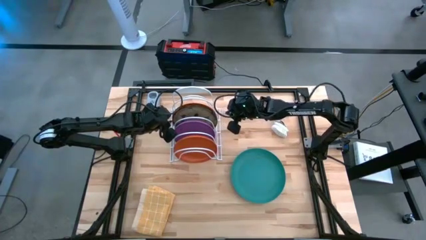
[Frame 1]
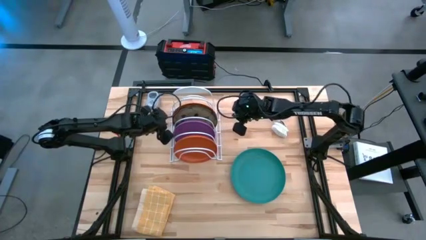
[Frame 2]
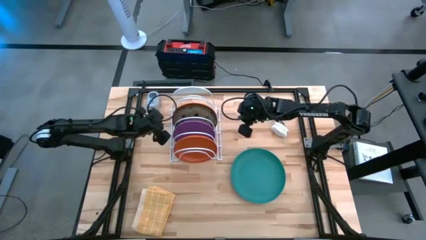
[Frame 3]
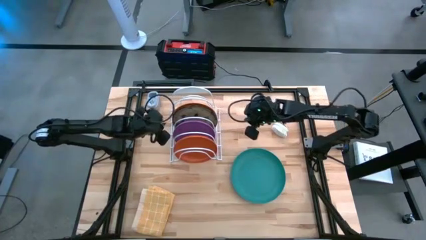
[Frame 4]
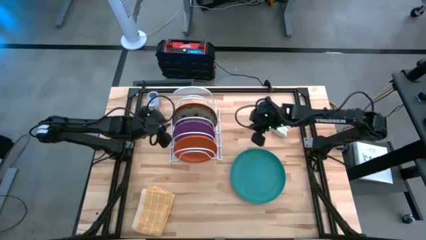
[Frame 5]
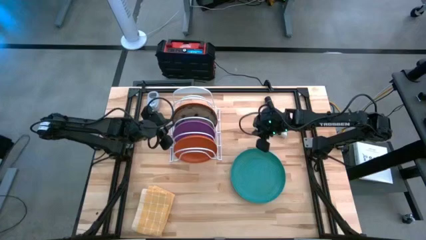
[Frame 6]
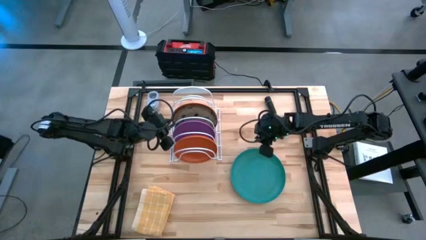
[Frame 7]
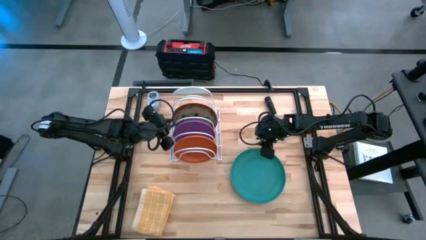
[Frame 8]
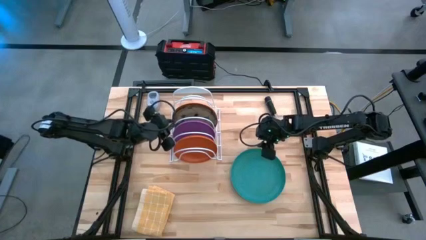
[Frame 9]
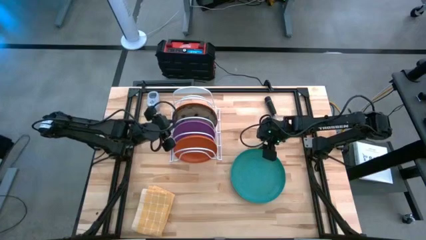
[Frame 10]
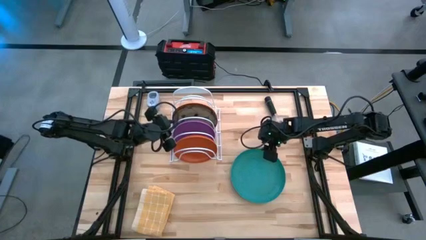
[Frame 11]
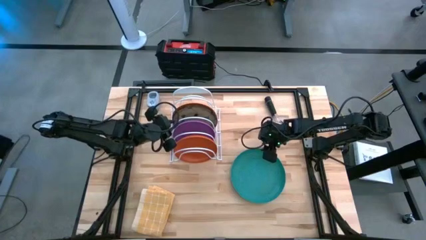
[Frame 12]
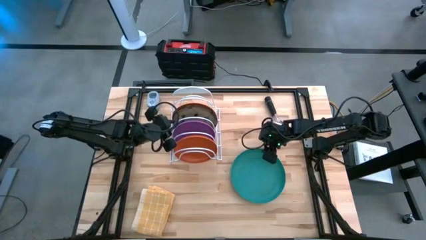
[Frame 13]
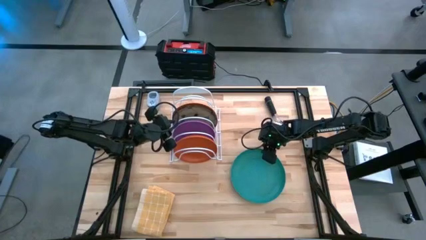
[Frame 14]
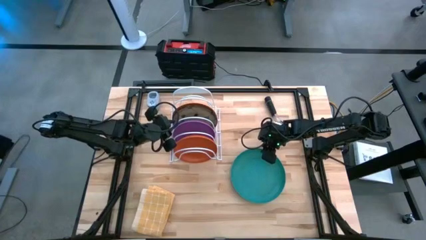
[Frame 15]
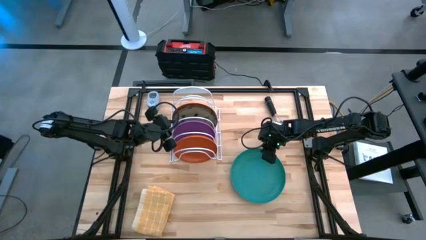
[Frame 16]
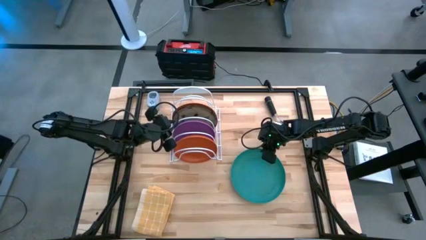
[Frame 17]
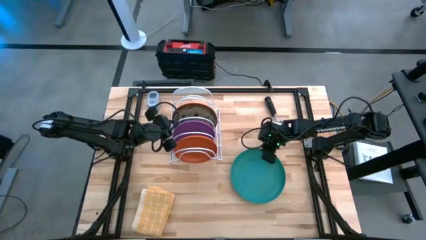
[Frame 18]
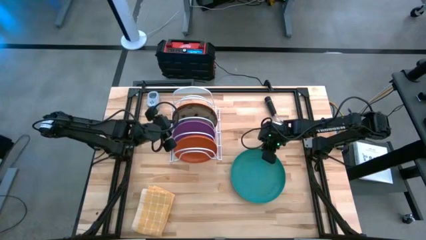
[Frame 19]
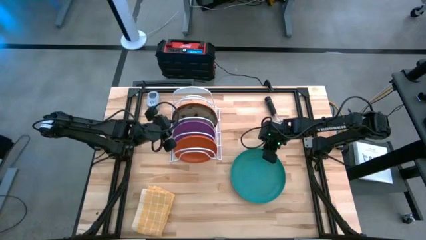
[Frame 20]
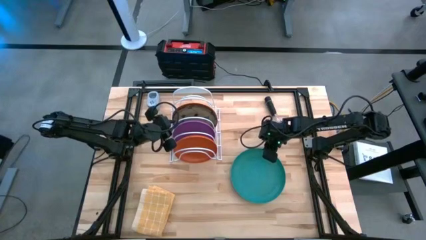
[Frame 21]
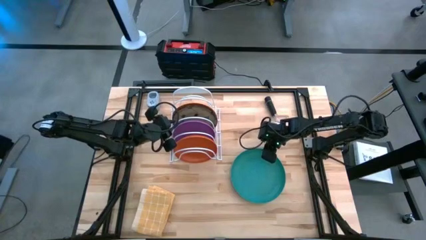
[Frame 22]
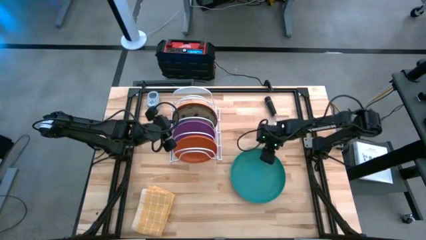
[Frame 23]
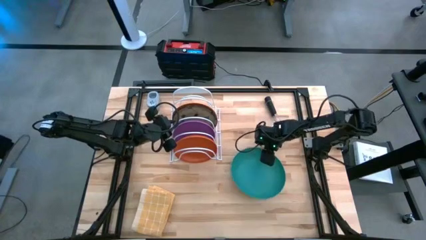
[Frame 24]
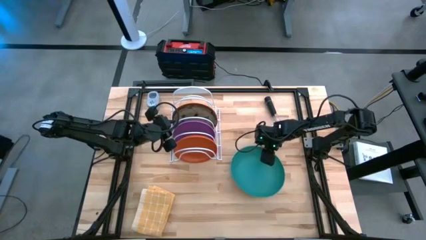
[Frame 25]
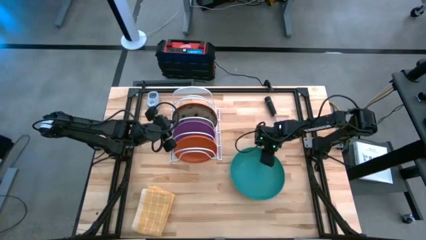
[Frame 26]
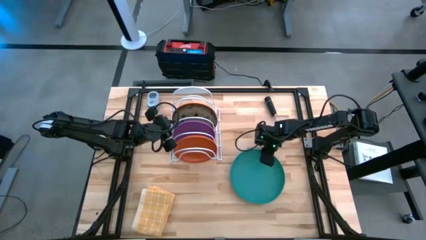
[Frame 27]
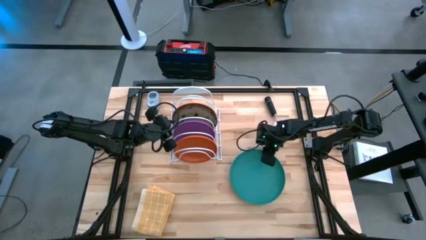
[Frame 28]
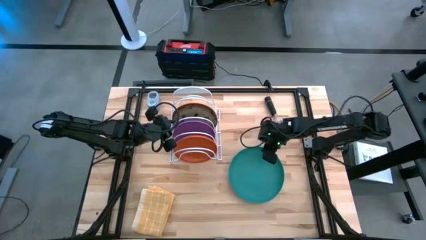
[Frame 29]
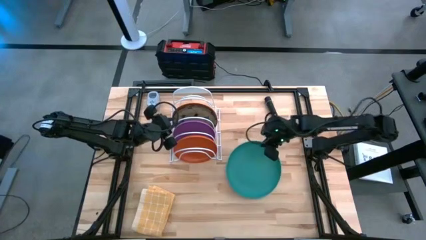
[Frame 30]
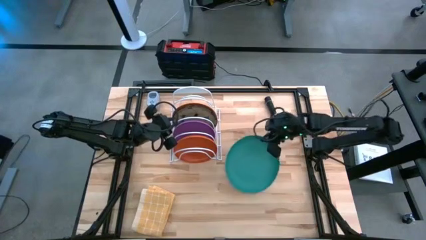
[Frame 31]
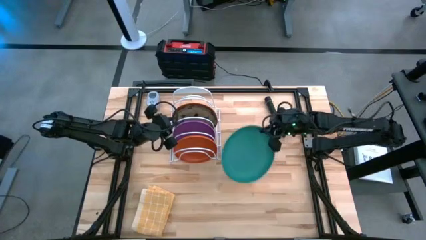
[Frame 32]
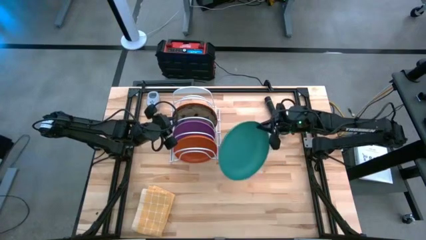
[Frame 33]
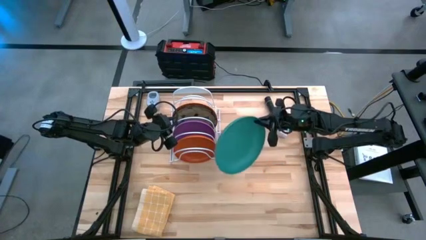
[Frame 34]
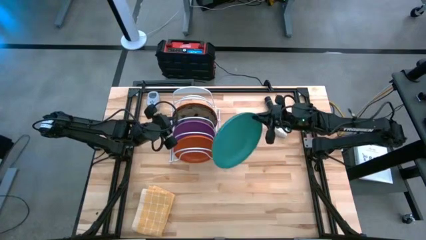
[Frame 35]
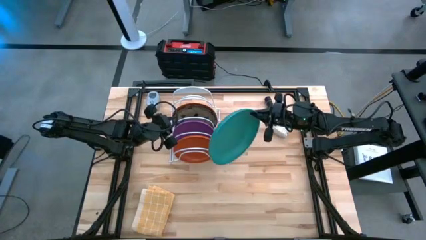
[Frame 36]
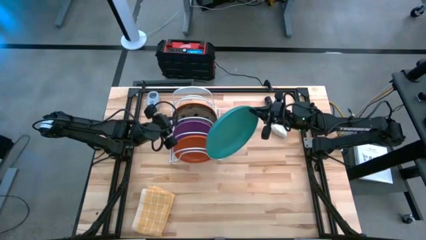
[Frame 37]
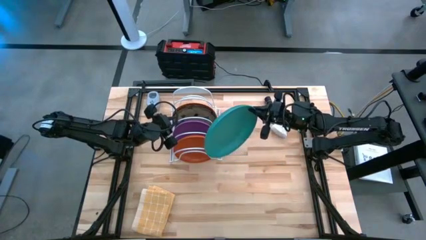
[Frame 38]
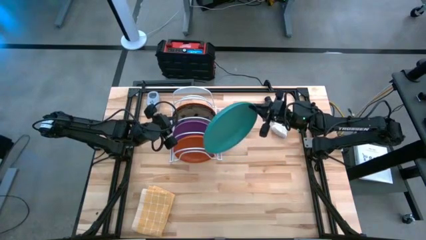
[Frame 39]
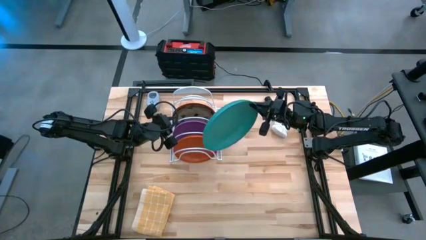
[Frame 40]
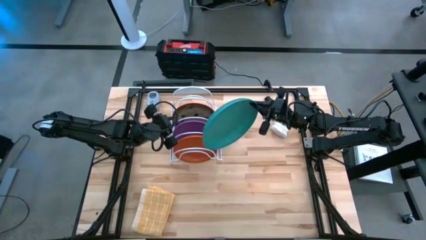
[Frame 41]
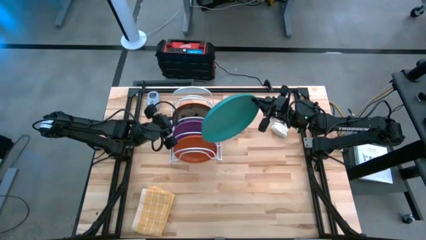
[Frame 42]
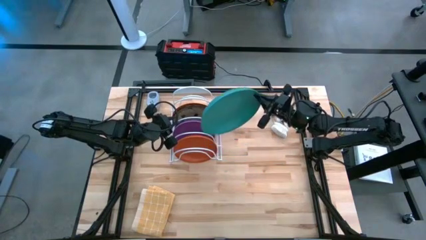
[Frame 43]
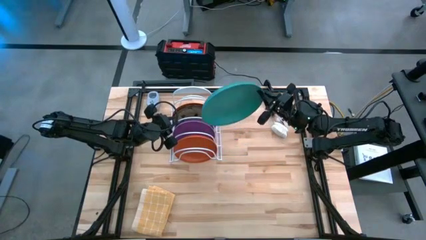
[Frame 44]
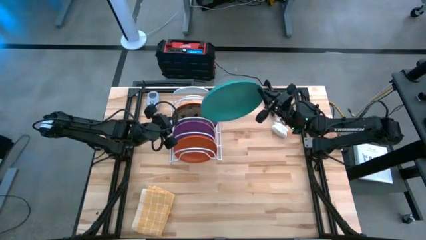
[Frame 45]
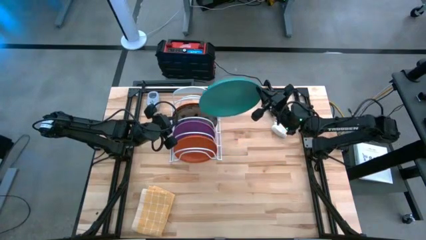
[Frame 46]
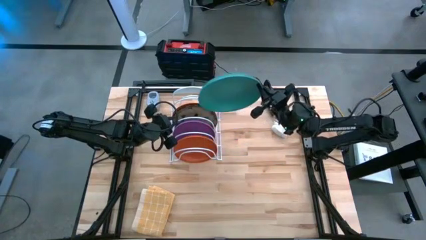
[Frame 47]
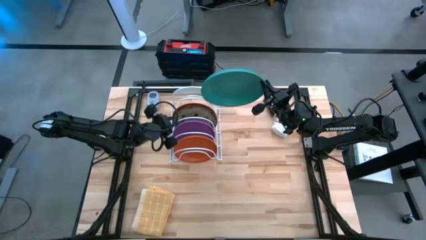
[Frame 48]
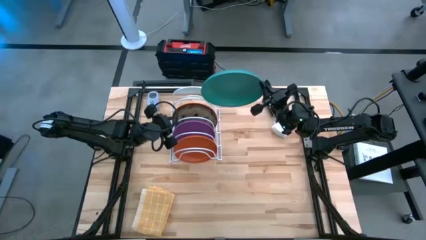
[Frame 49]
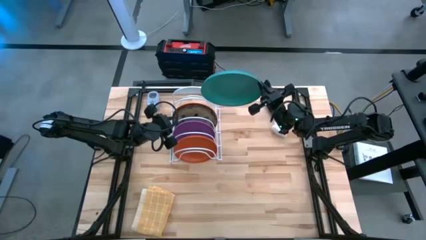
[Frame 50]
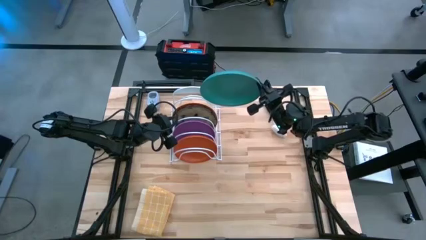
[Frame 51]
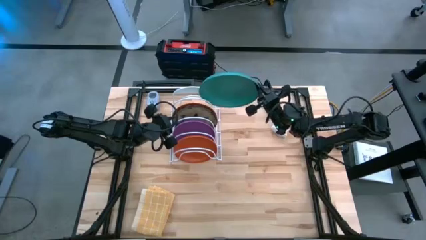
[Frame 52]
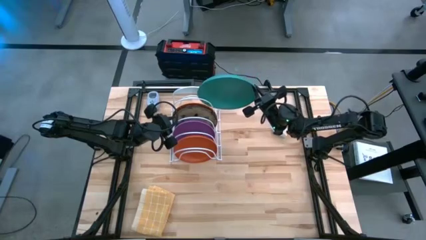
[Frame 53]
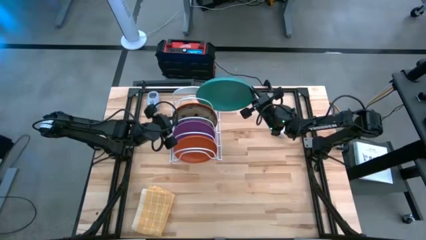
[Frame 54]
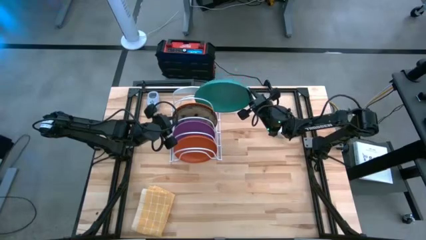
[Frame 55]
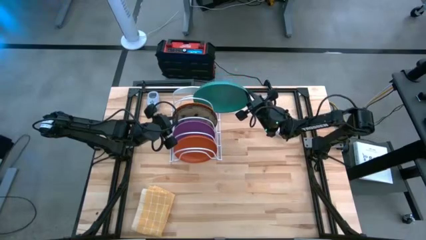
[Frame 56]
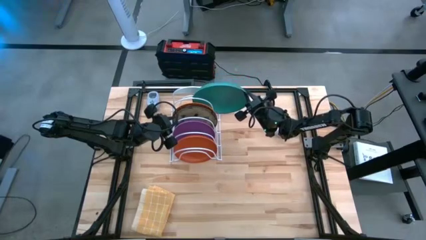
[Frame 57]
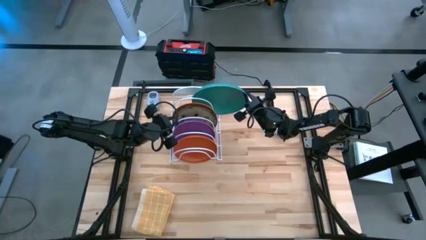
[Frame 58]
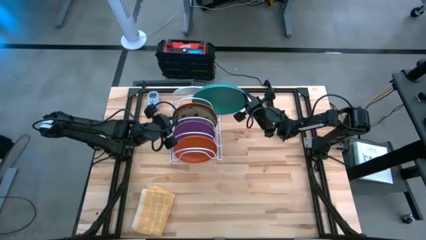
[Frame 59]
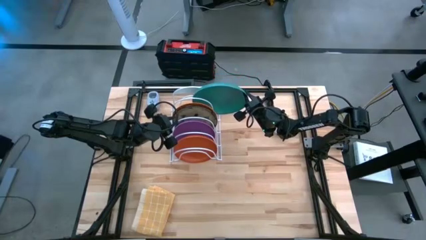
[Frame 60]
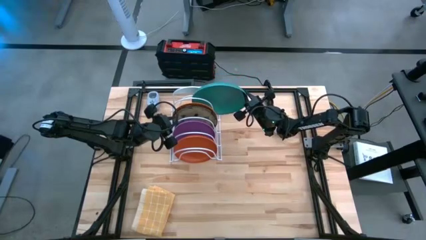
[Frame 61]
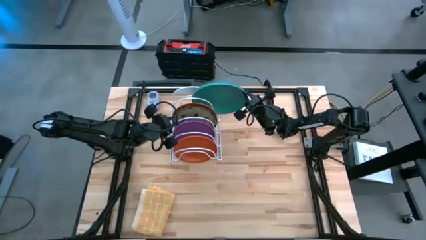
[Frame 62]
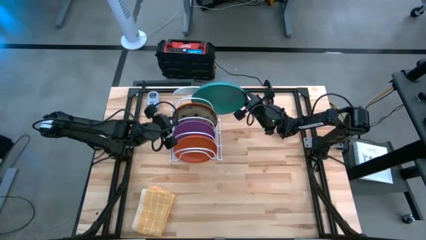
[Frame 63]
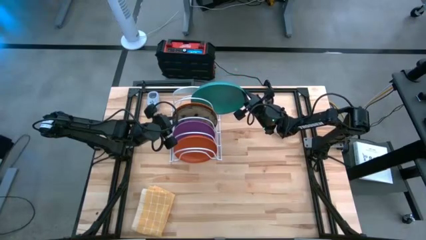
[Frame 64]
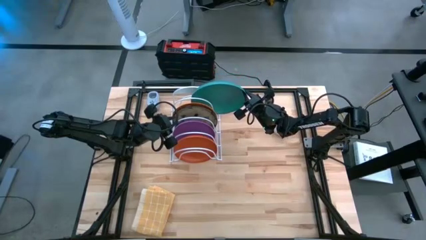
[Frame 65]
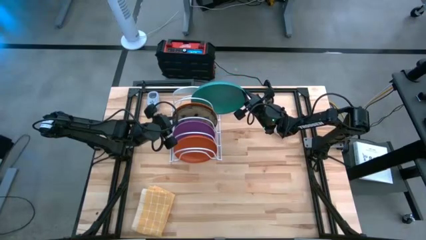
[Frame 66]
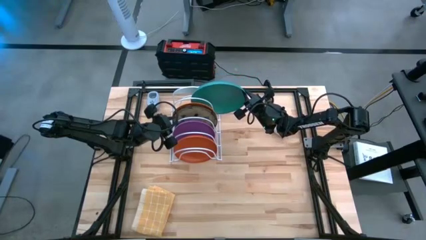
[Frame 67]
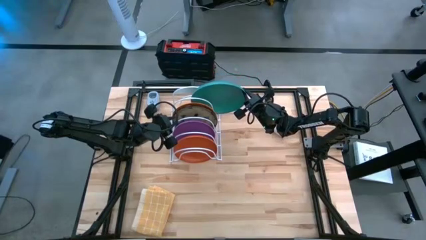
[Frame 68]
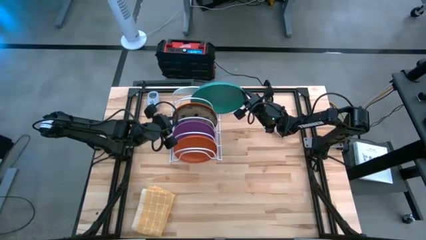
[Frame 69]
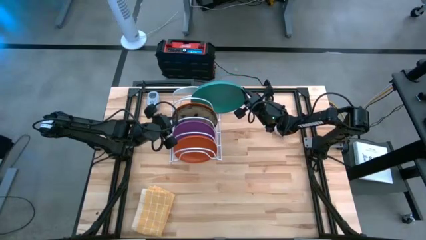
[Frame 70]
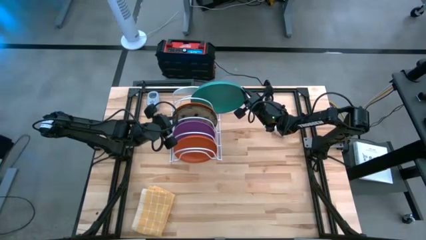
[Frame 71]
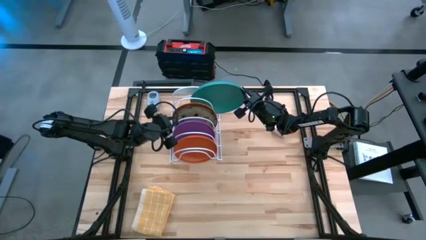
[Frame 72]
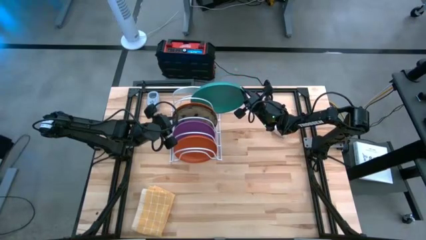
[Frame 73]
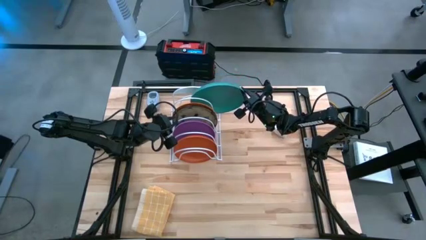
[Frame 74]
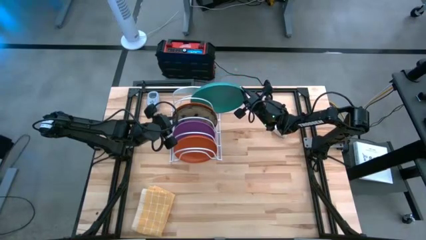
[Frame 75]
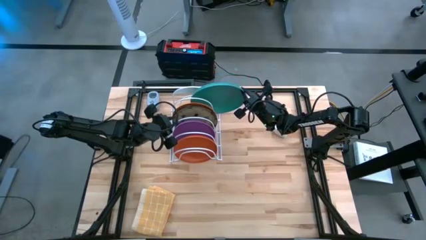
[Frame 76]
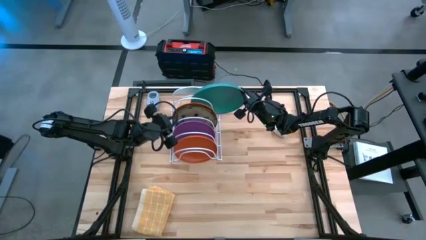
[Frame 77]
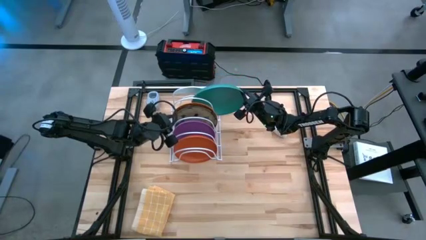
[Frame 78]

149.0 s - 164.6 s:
Task: Sort dishes
Put the green plate into the dish rack

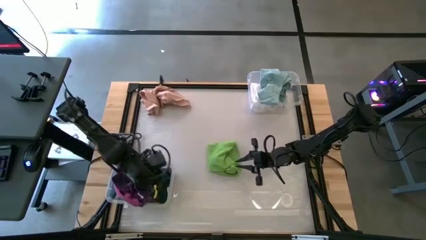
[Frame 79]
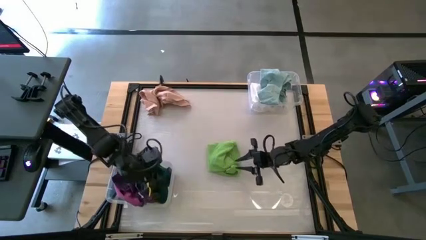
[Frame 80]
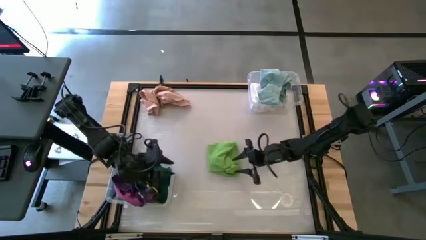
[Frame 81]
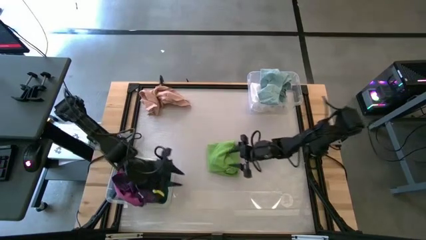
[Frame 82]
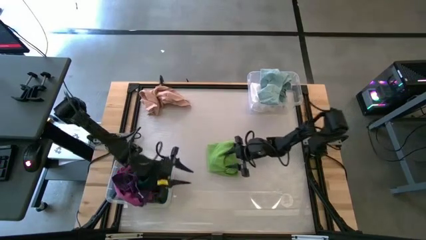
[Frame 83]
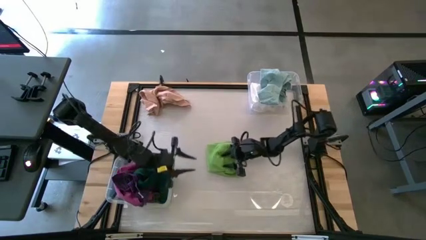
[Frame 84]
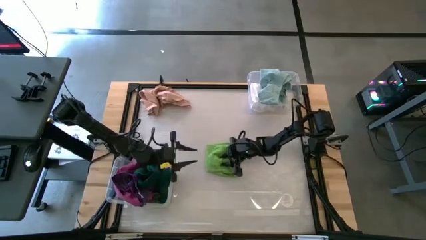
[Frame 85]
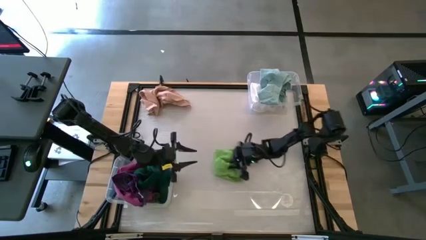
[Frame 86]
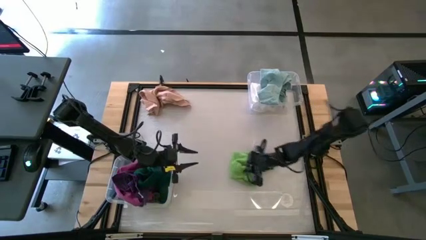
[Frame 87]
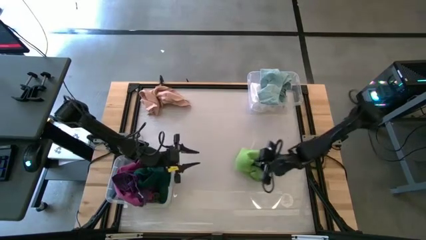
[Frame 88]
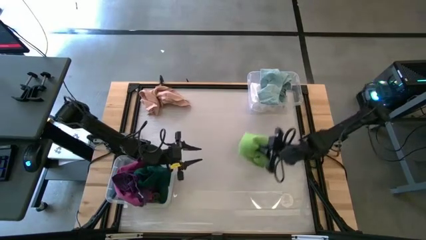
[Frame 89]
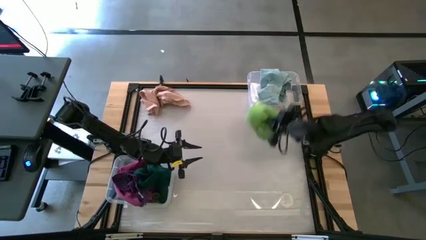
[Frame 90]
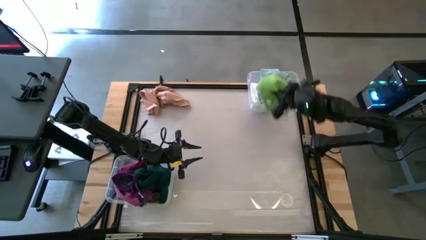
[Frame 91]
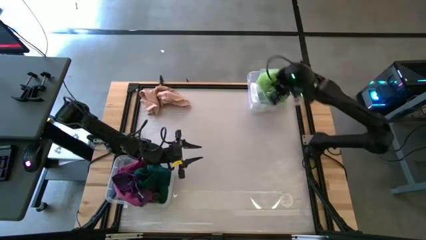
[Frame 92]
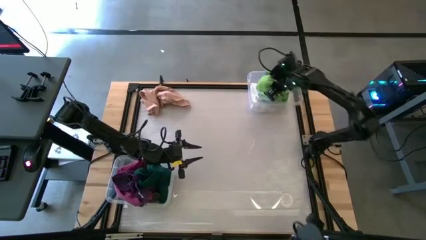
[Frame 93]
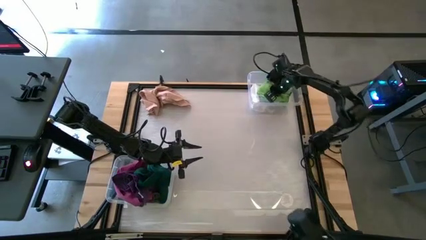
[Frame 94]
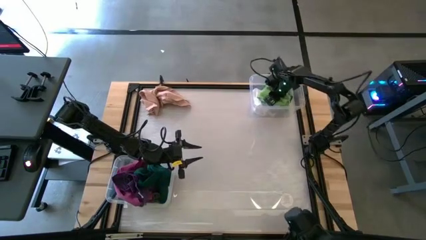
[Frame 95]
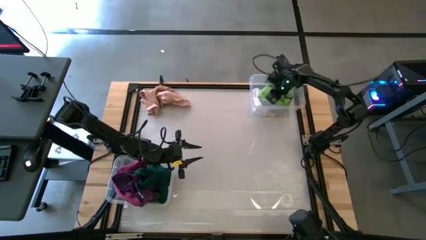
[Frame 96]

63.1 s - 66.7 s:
Task: Sort towels by color in basket
Put the light green towel into the top transparent bin
